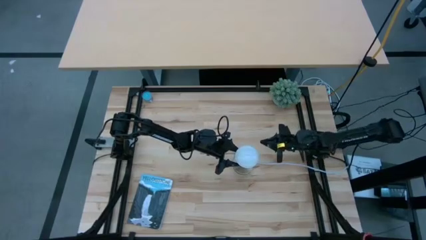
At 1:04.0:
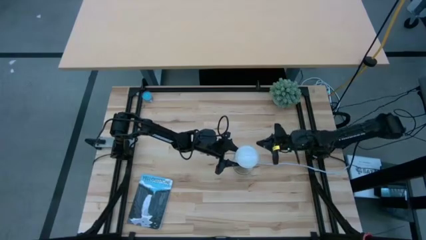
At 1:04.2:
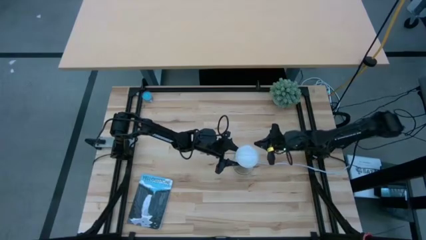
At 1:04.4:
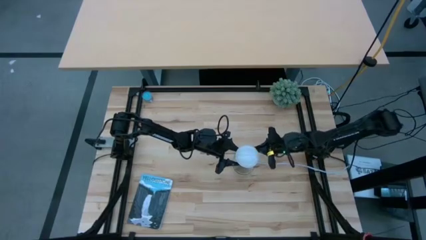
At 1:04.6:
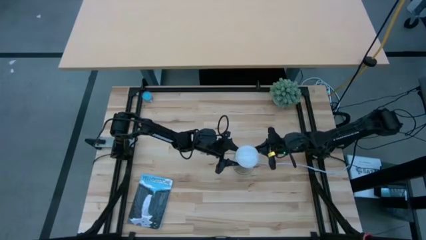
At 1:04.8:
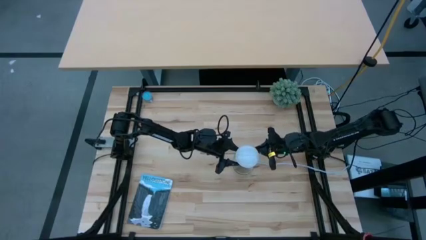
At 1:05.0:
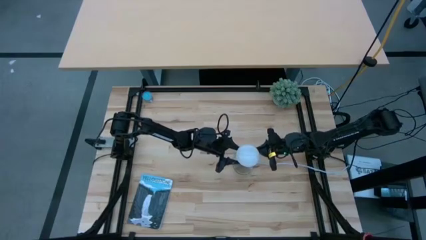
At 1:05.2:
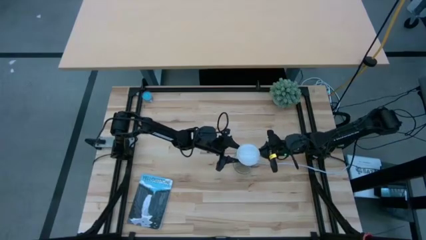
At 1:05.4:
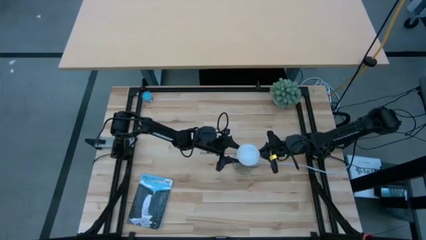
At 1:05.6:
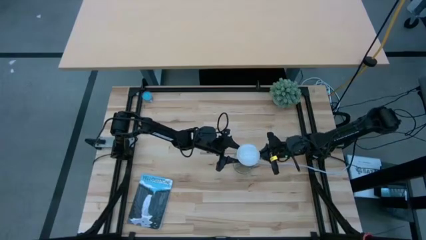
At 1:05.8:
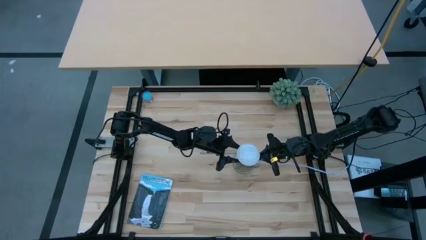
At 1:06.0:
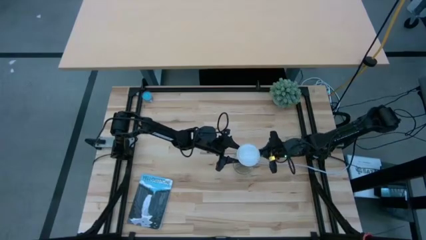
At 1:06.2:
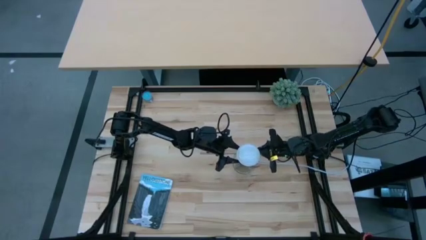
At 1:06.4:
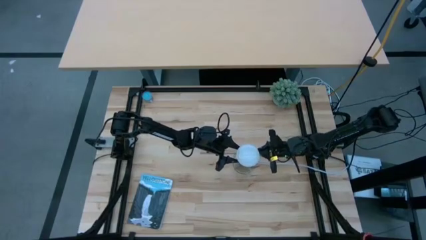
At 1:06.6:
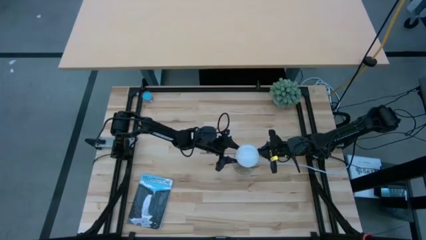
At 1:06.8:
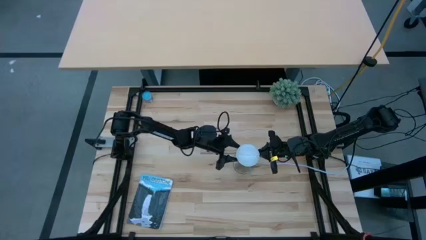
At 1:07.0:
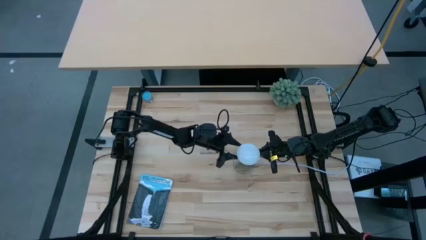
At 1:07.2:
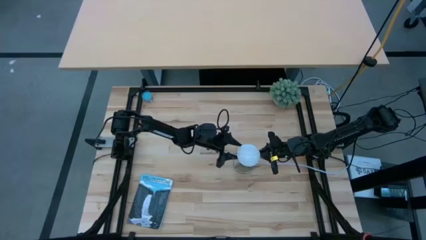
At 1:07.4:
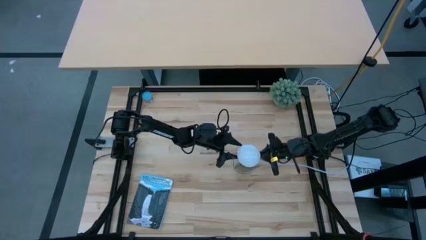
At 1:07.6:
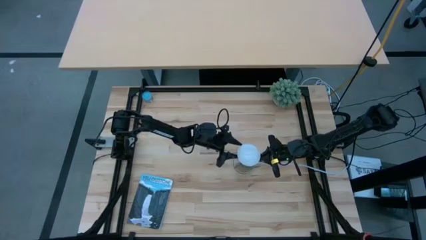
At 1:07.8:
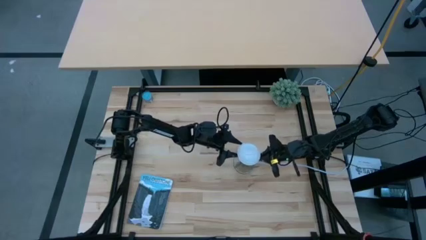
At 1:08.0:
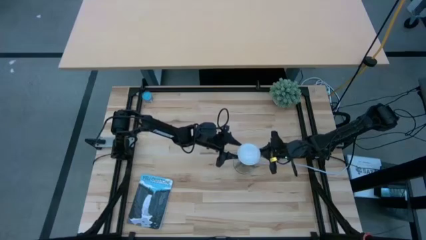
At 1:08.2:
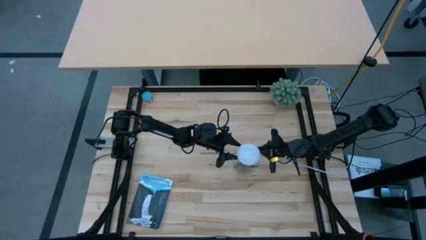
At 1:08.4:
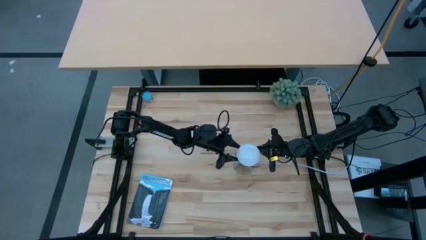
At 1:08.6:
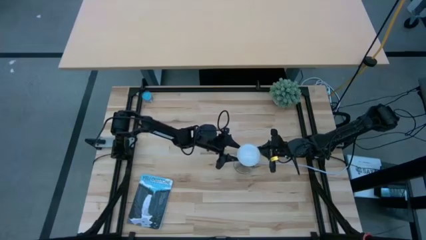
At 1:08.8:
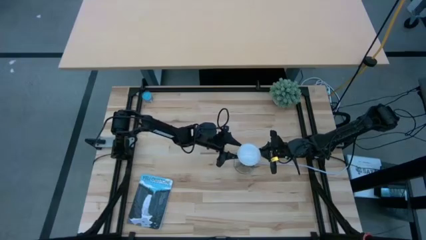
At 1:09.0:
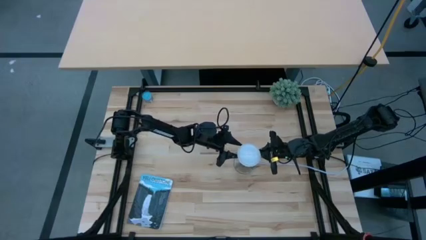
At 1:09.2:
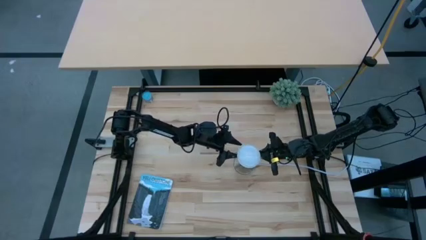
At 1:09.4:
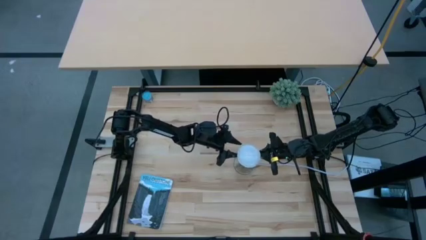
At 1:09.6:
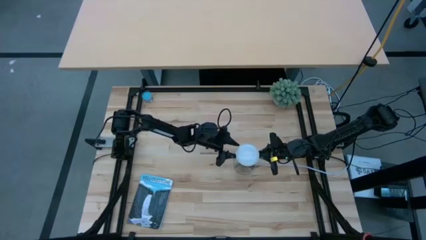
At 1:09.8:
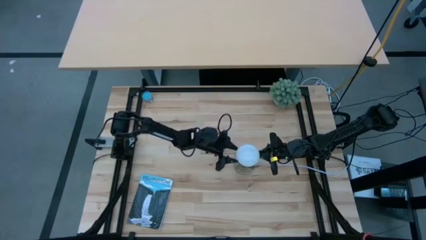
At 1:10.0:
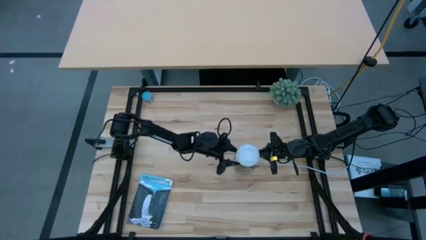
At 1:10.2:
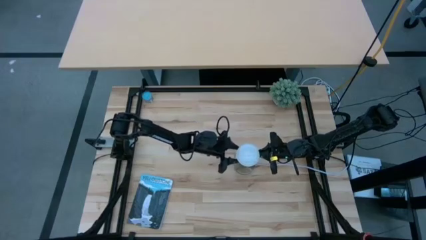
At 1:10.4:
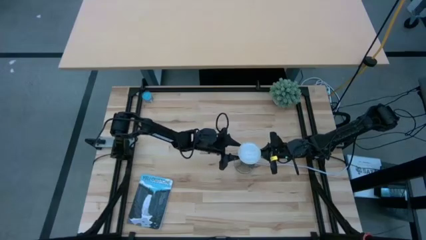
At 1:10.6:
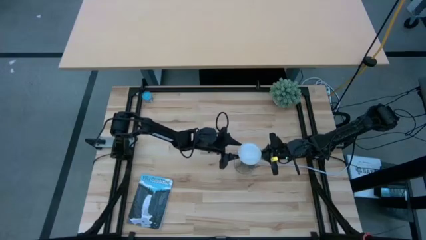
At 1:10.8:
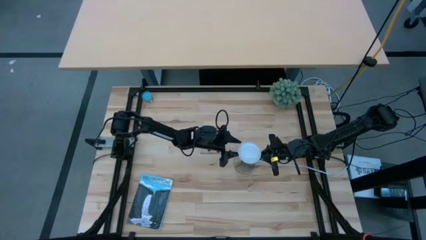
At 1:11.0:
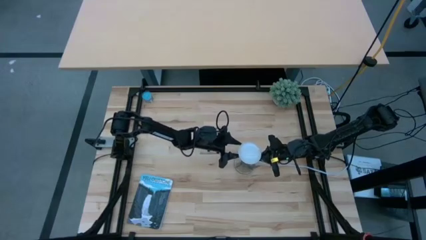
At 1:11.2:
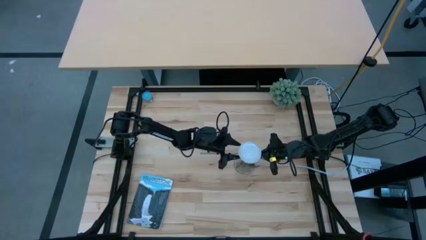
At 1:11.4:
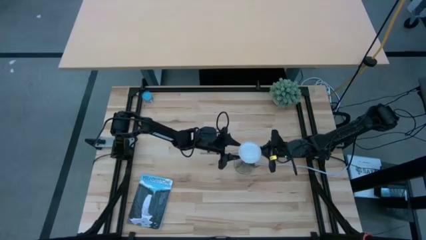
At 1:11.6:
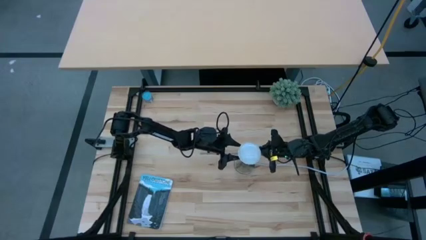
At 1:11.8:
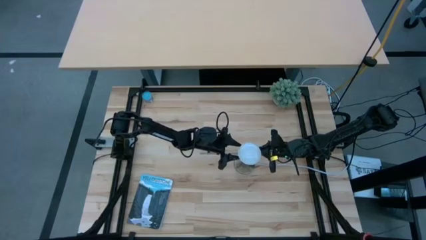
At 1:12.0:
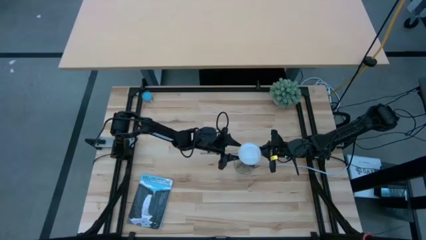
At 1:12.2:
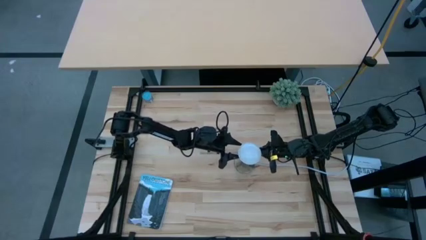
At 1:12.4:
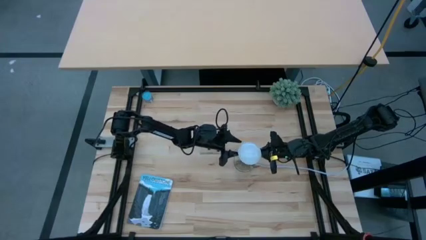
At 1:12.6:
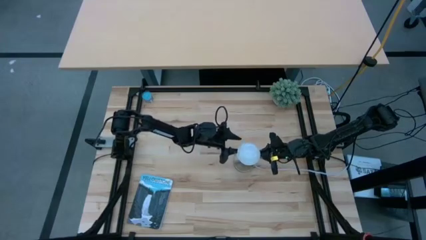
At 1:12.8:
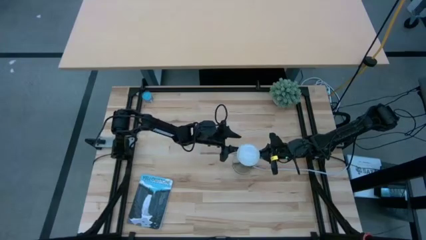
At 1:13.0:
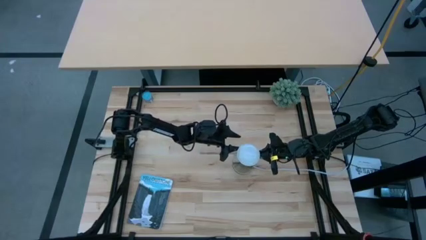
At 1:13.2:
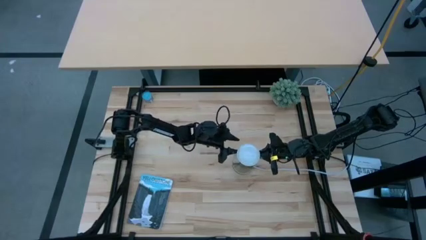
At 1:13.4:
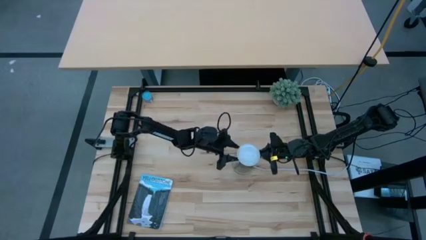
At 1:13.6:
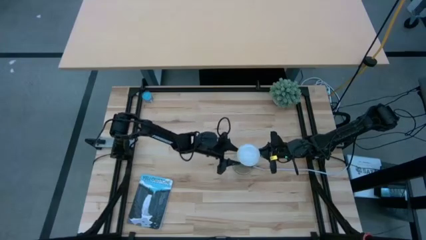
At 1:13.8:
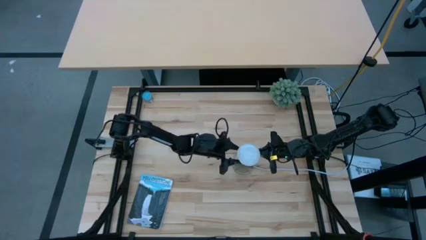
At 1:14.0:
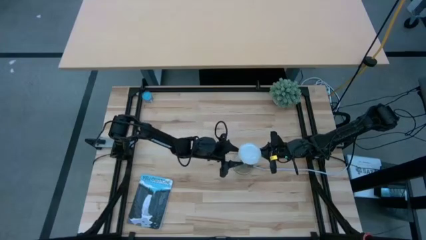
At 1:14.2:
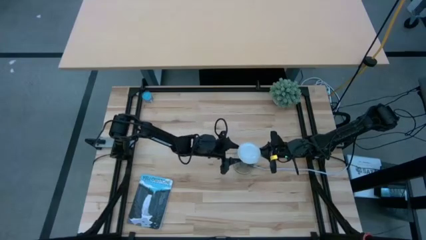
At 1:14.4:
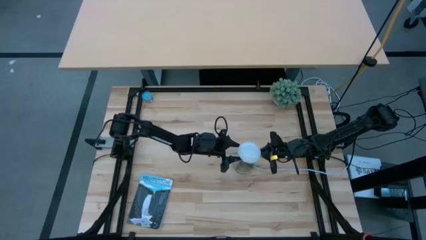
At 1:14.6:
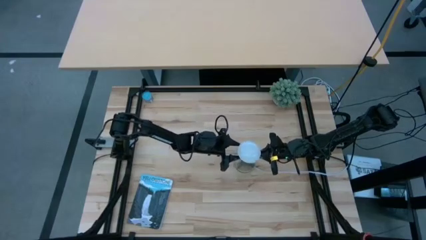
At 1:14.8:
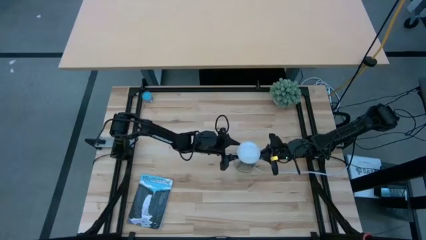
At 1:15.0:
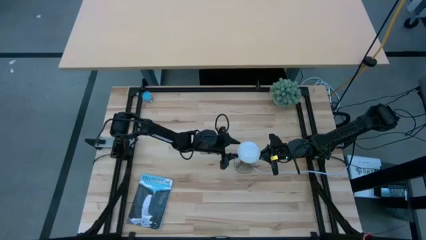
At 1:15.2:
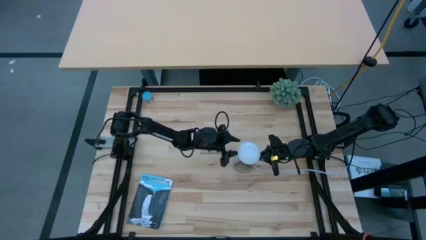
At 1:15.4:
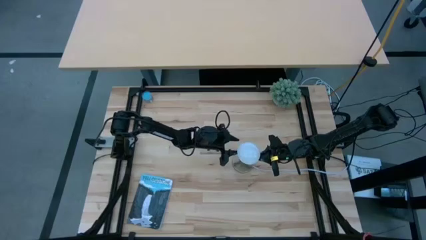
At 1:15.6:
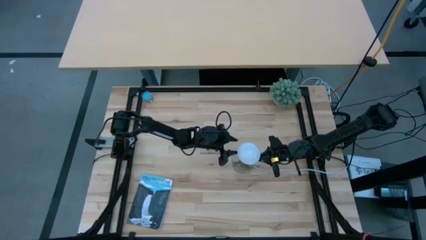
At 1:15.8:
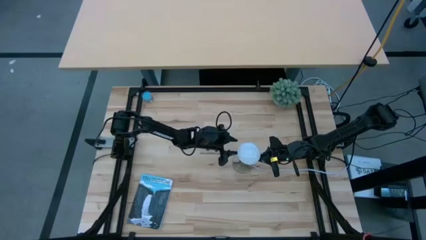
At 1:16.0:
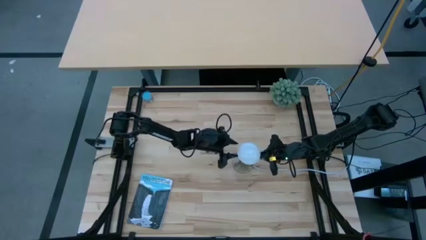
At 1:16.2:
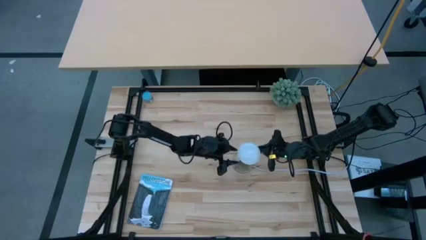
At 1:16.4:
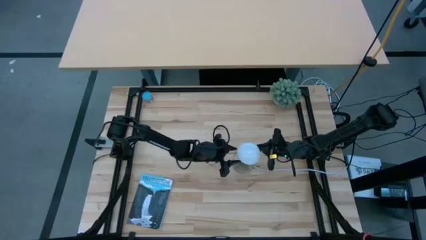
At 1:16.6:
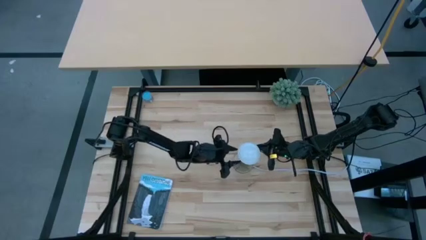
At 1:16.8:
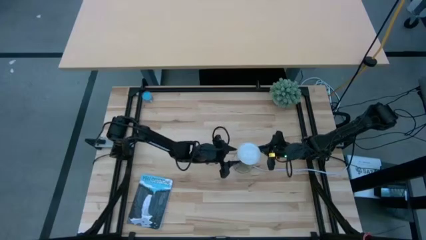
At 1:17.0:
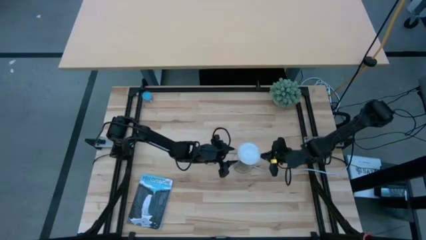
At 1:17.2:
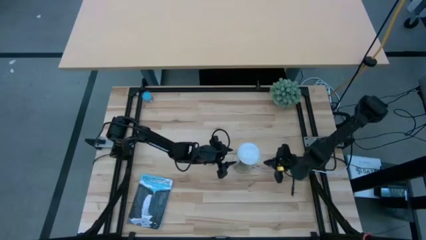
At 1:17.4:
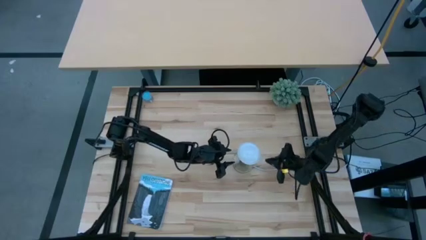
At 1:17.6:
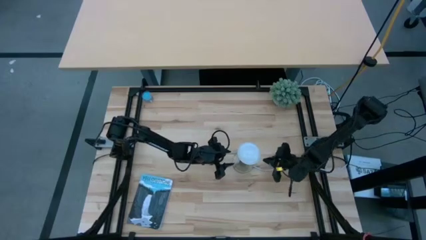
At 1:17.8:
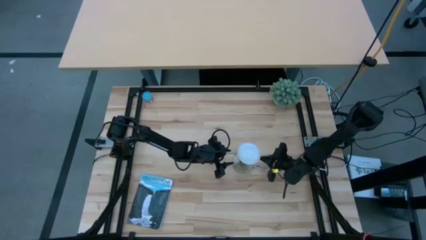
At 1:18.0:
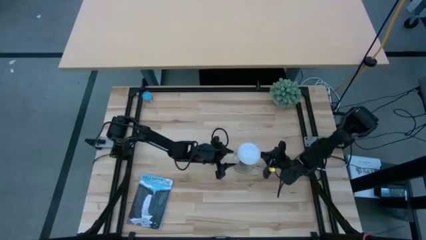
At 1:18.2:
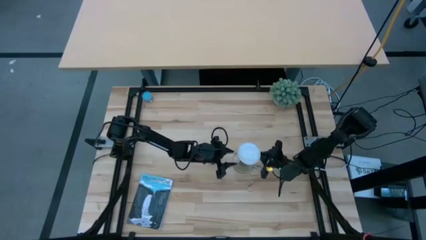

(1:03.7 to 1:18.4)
Task: Screw lightbulb
Insert the lightbulb into the bronze lamp socket

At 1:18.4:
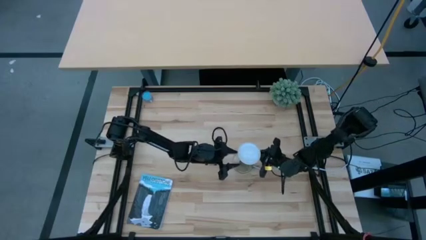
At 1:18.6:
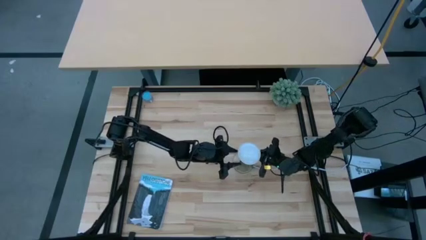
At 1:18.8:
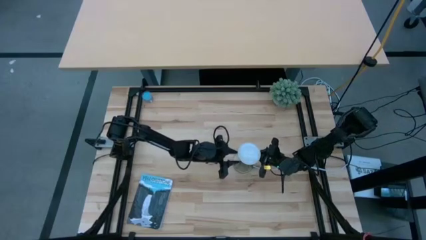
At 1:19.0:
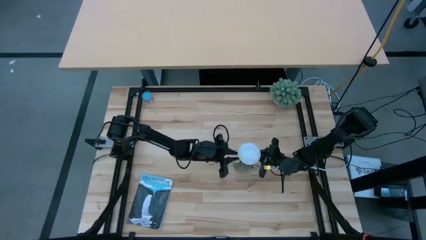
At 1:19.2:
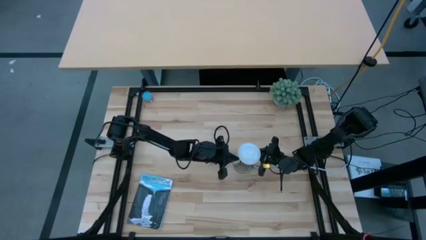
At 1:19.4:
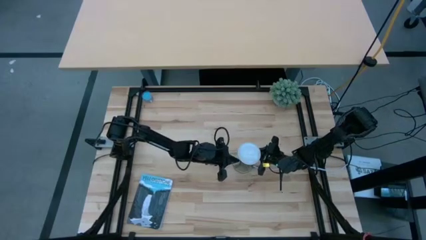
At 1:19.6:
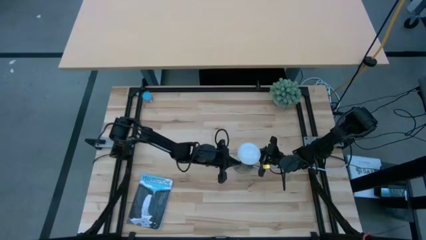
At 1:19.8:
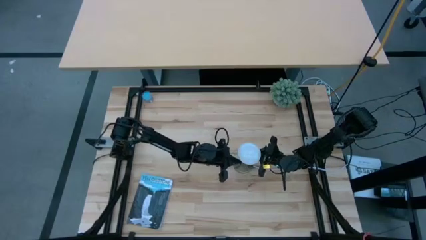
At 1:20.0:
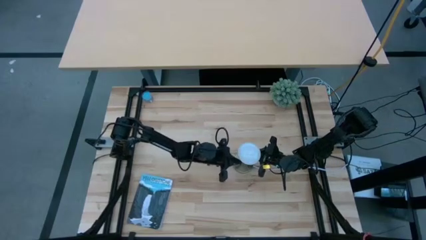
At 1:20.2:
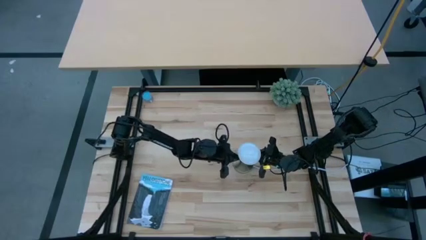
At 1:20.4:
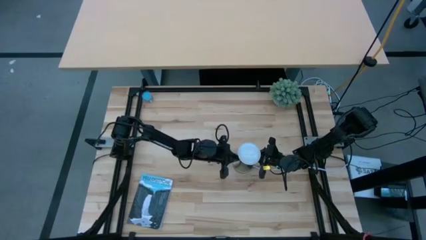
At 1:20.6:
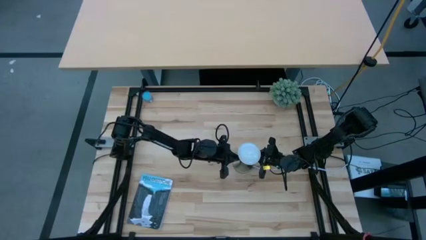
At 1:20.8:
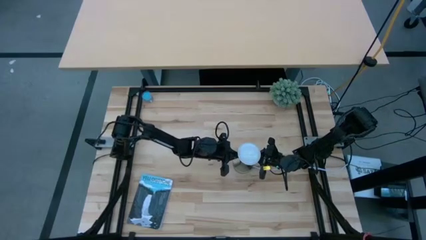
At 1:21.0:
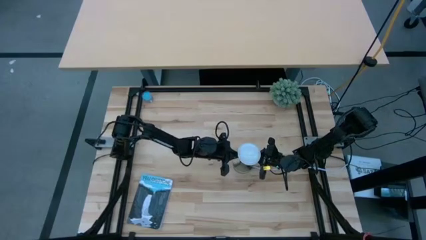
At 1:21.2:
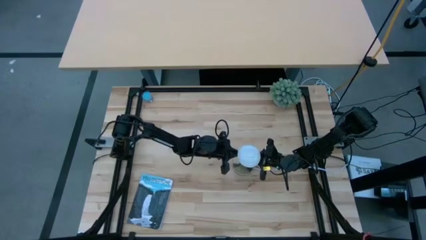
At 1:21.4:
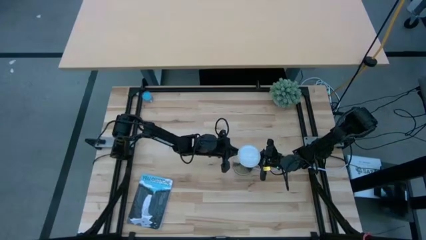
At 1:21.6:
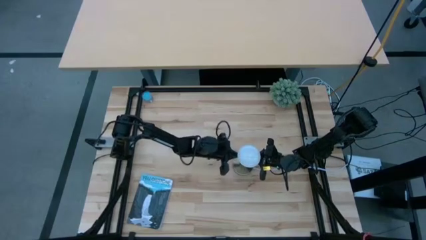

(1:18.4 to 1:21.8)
Insert the lightbulb into the bronze lamp socket
